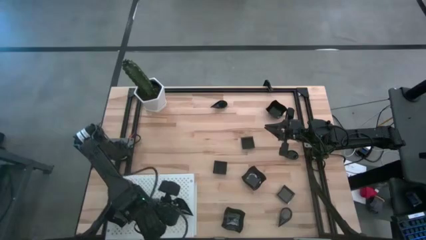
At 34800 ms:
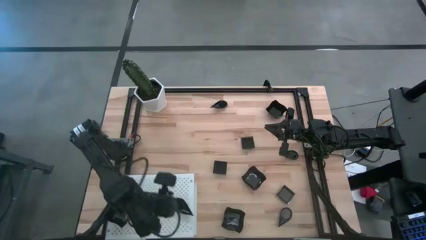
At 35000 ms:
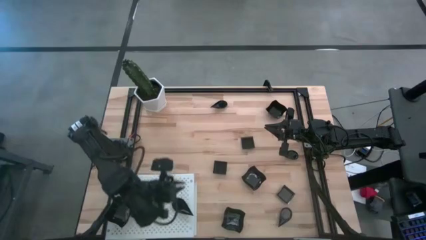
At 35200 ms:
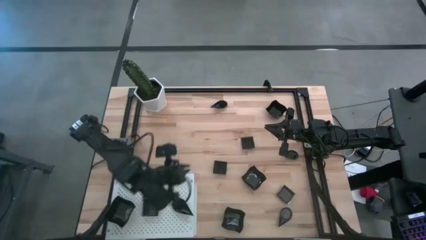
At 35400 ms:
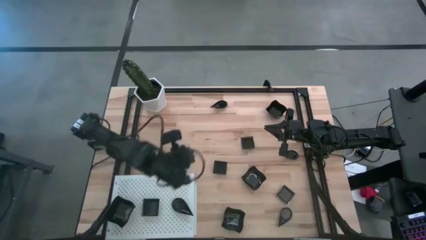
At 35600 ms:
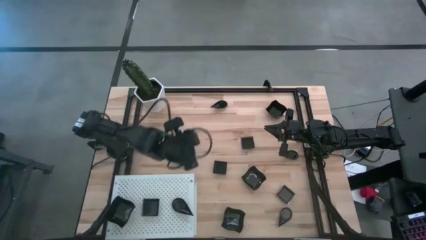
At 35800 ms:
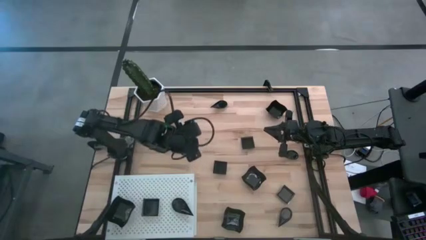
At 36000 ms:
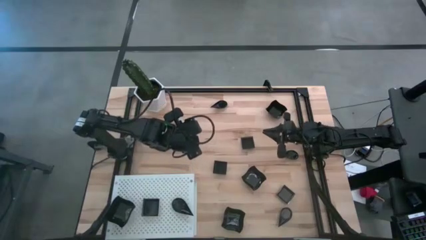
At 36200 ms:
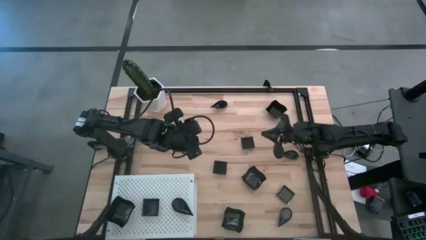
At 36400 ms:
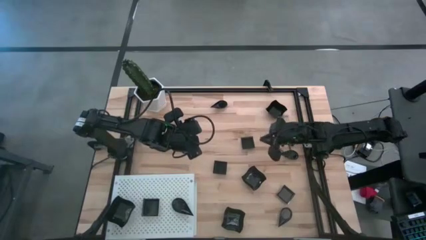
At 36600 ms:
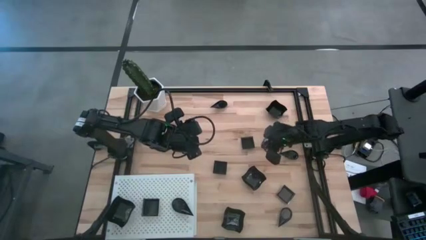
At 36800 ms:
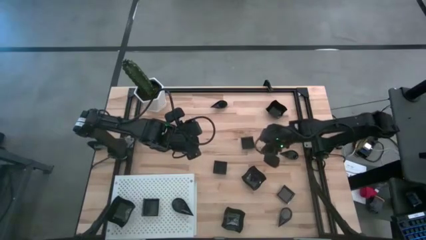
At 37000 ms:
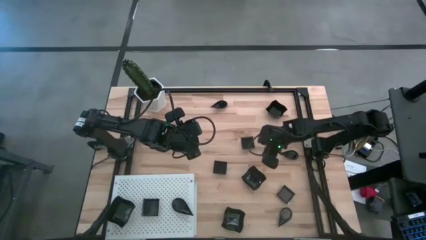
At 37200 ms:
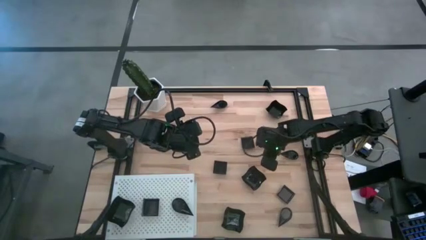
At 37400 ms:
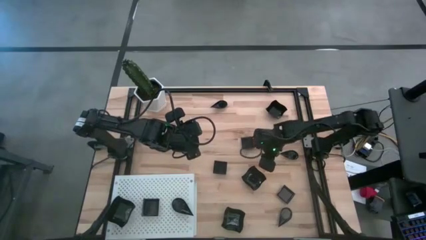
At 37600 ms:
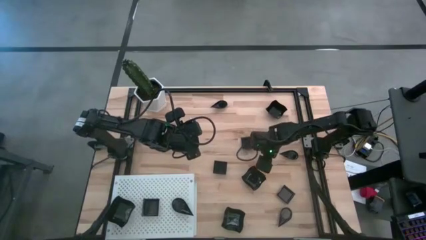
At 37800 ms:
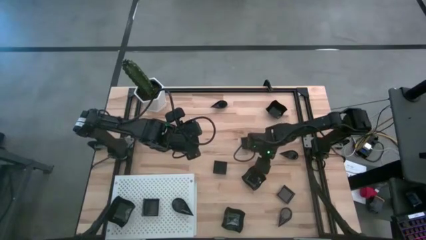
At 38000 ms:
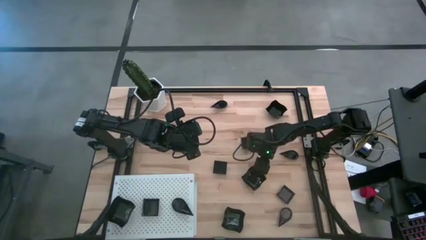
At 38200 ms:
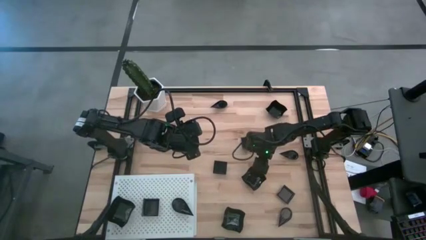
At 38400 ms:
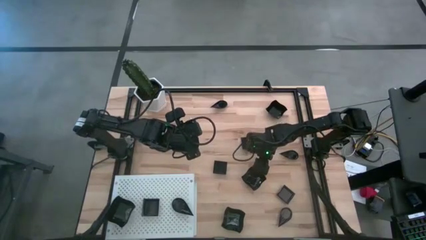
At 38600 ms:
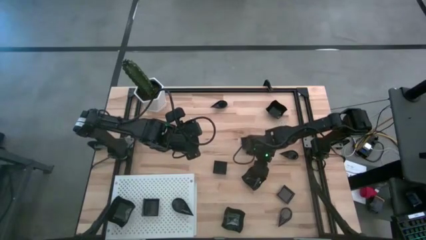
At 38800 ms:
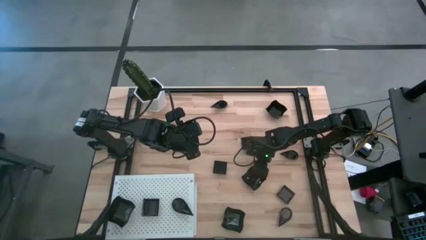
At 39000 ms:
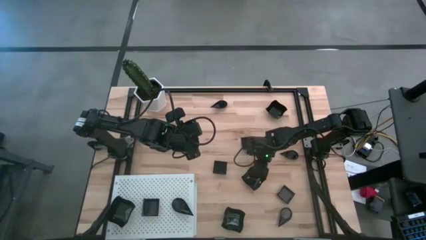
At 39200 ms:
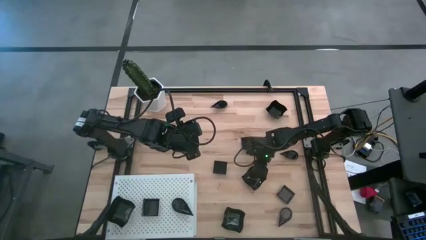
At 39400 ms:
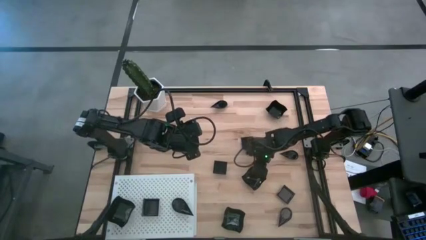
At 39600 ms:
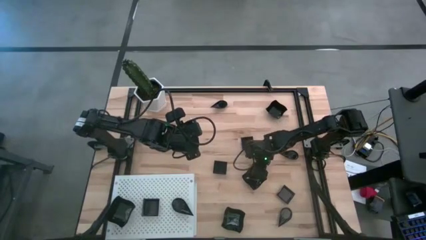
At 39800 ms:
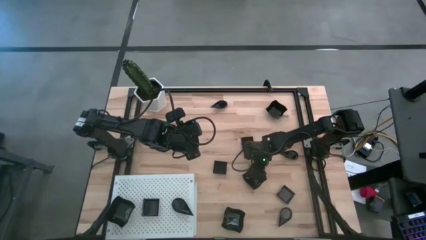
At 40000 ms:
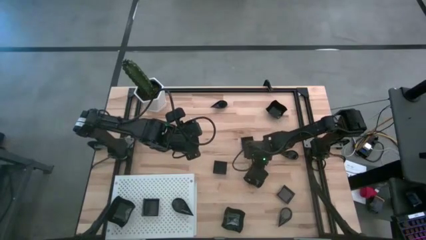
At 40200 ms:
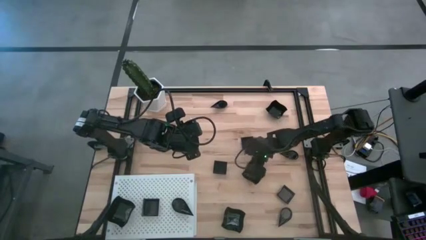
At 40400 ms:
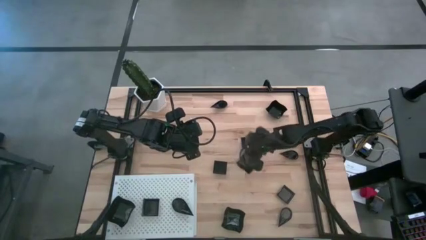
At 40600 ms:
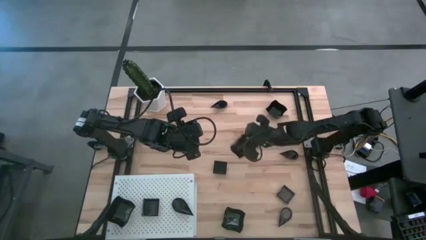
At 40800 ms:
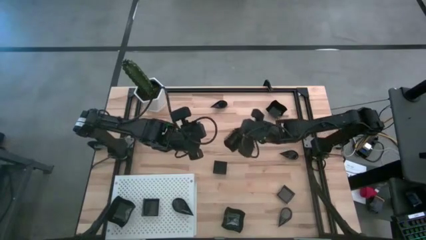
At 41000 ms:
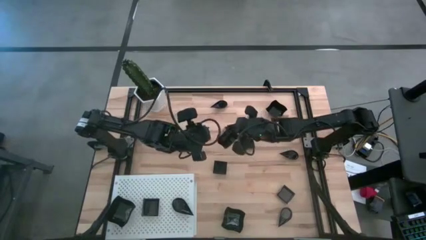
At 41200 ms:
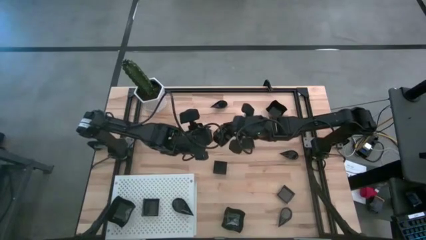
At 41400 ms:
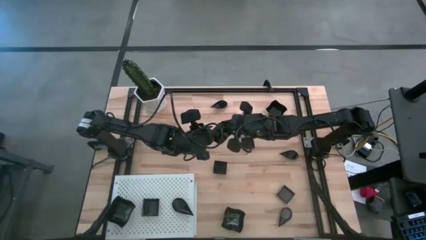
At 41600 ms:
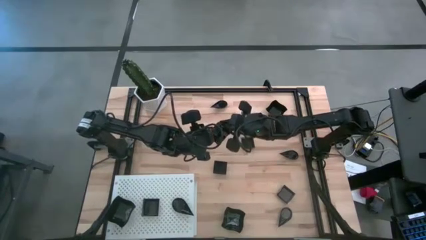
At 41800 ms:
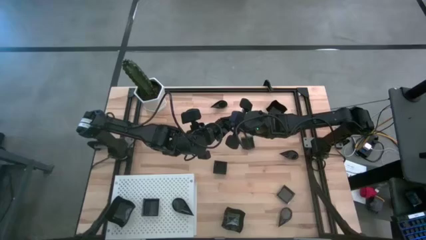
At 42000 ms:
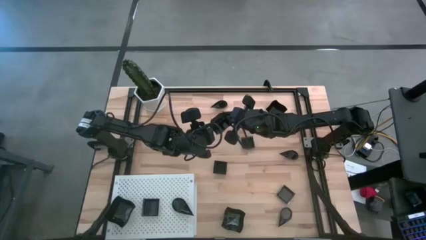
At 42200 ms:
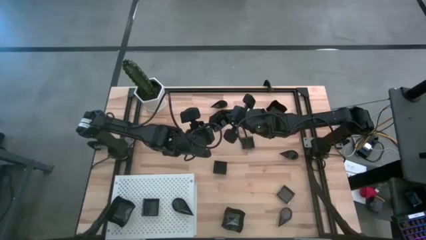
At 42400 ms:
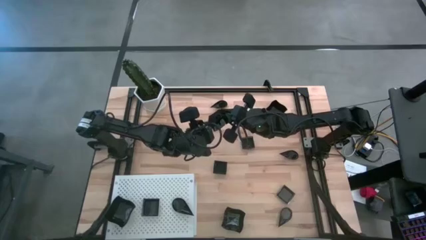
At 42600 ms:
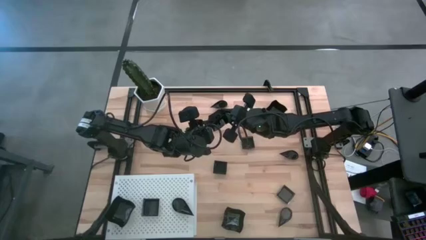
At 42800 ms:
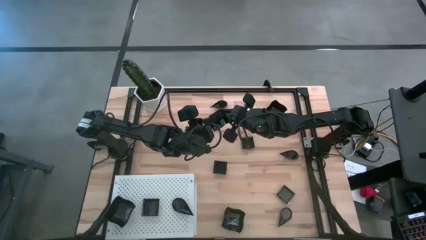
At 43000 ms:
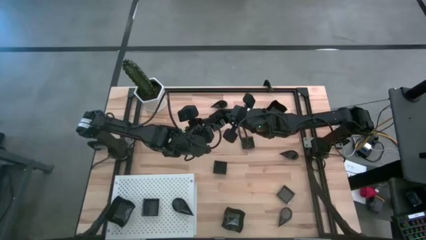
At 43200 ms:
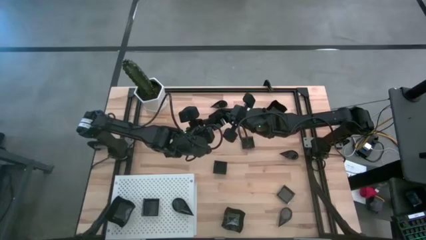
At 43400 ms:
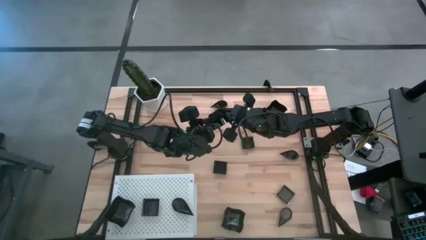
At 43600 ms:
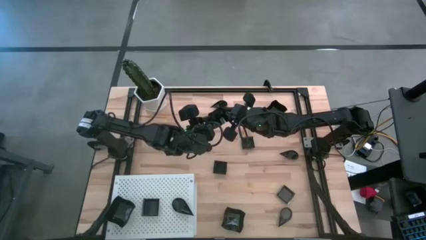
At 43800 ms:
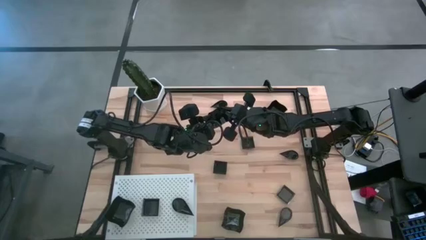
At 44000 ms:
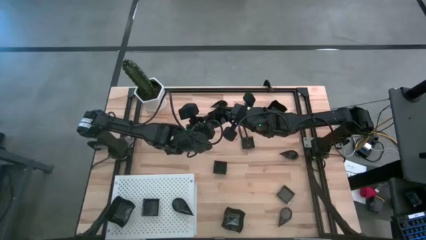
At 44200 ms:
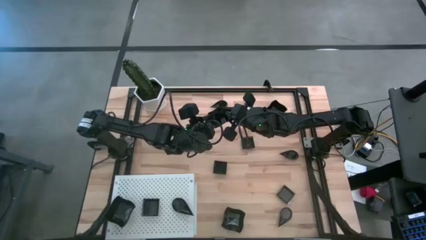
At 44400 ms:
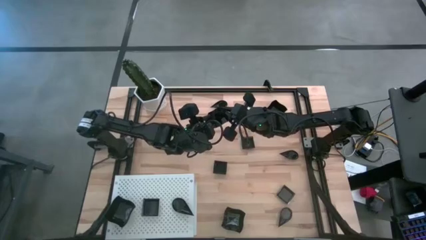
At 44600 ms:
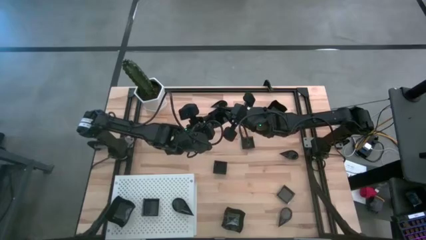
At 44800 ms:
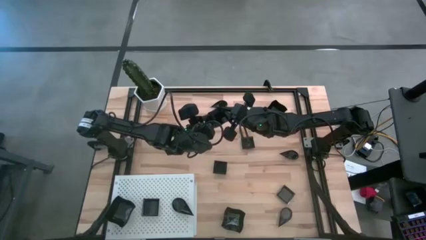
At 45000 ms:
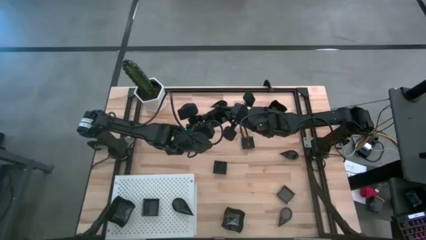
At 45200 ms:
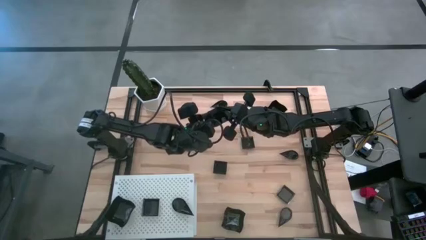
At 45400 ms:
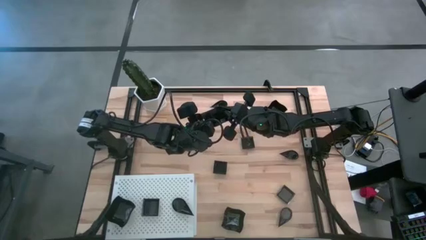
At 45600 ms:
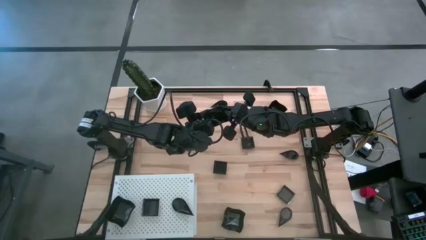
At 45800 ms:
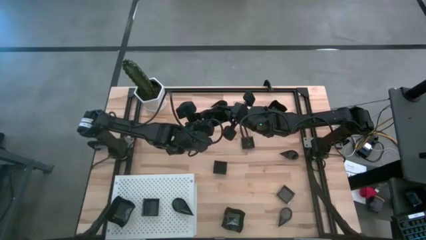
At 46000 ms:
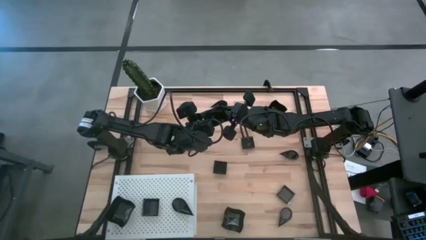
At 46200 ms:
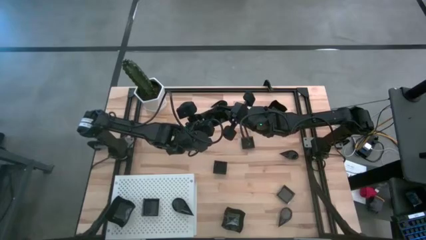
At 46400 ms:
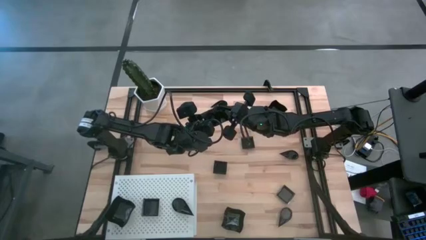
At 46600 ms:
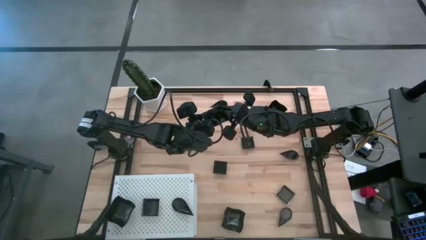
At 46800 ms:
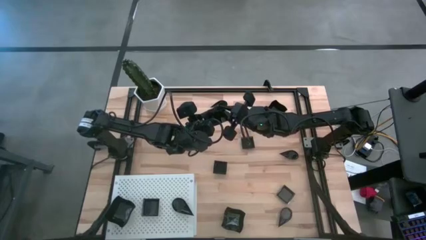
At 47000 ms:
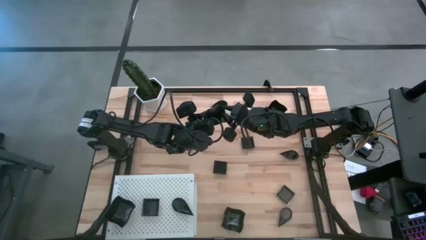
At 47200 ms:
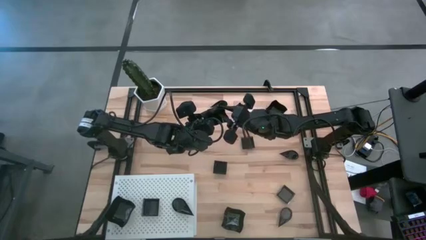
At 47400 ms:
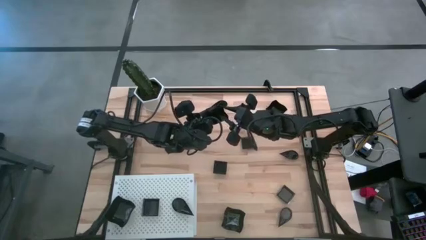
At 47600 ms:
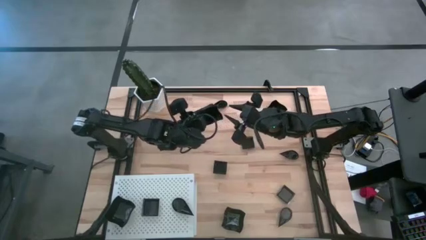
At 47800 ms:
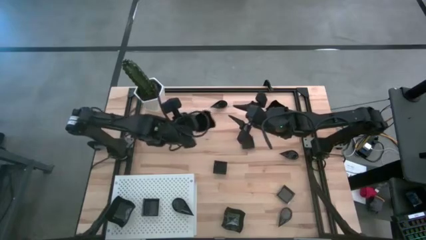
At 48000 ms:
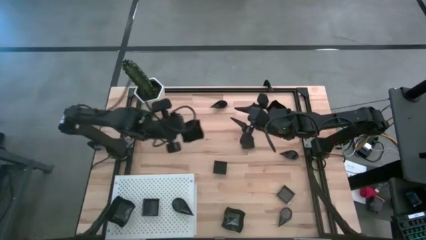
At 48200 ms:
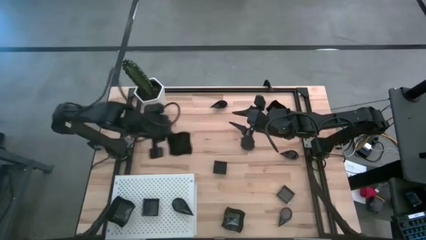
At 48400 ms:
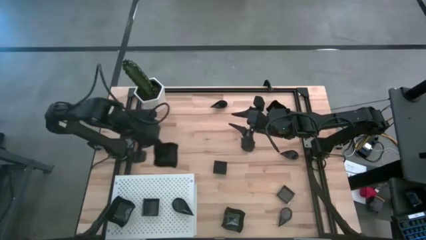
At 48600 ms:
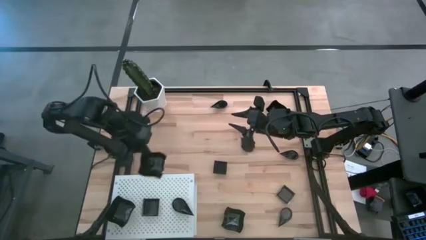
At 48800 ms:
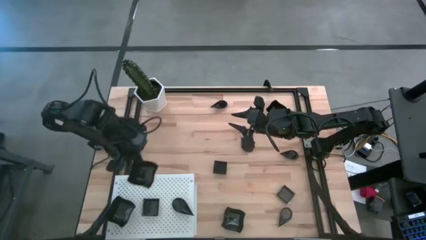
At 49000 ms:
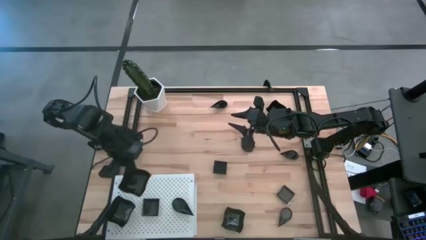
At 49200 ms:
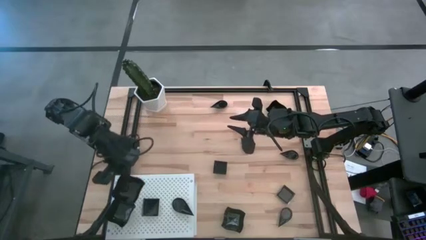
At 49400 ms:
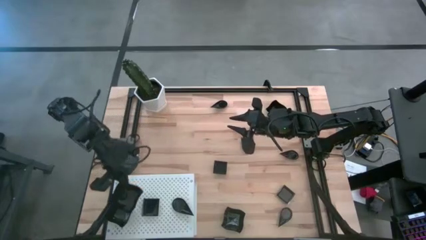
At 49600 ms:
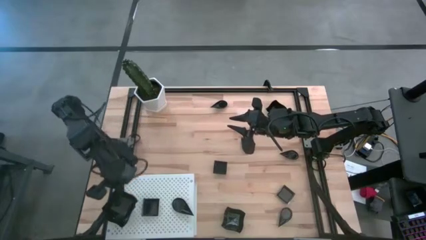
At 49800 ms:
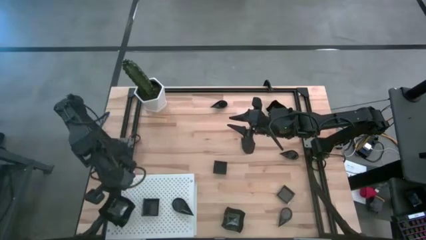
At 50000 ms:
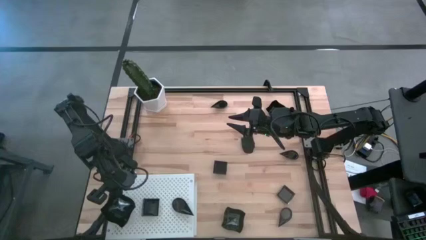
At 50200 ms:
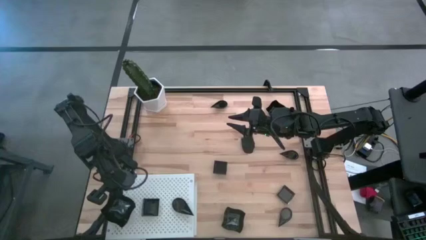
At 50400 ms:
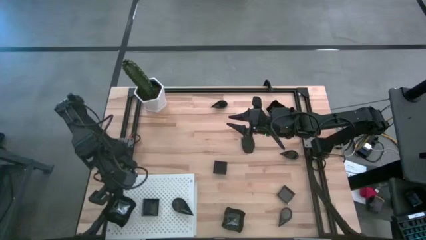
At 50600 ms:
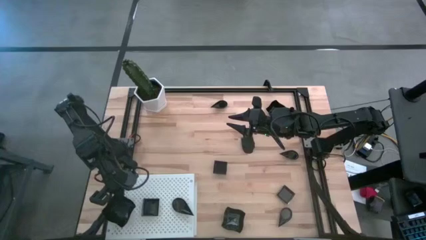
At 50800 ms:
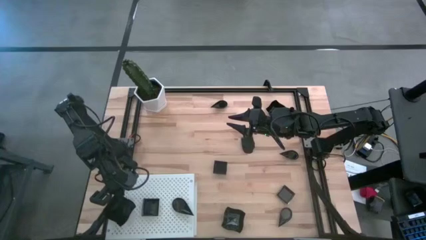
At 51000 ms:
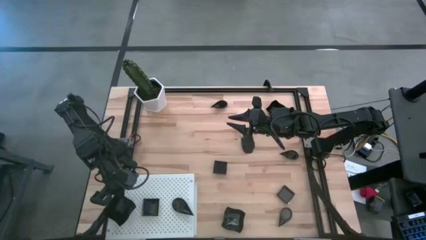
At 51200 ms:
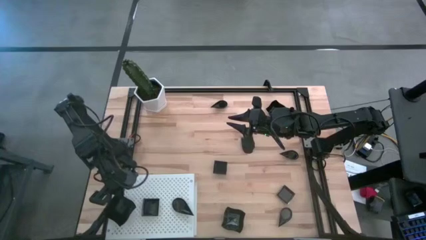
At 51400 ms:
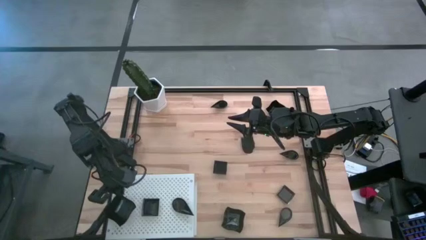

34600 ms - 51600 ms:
Task: Pick & Place Mini shaped plates
Stack the distorted square plate on top of the other distorted square plate on the shelf
